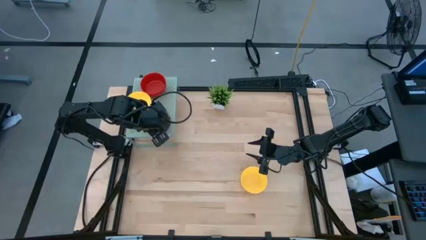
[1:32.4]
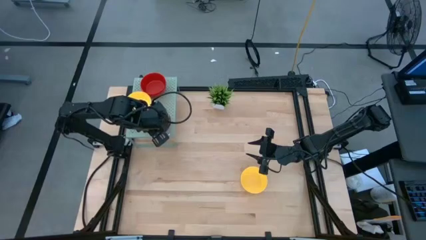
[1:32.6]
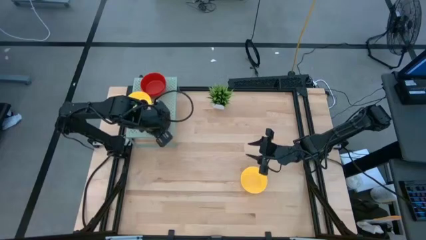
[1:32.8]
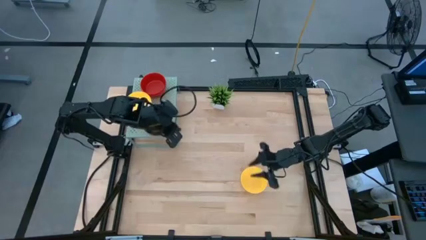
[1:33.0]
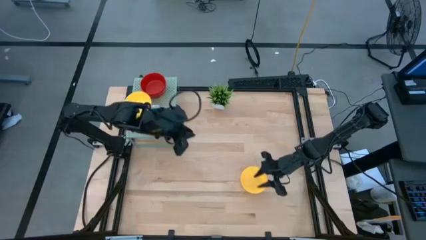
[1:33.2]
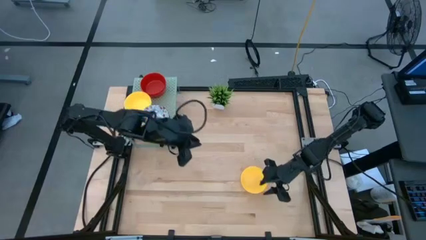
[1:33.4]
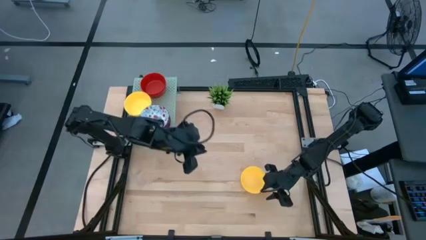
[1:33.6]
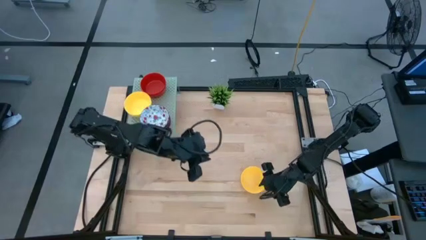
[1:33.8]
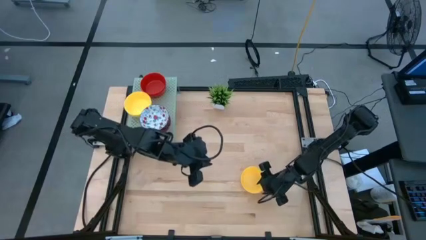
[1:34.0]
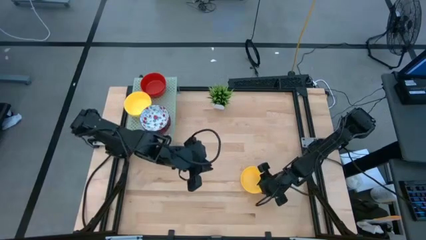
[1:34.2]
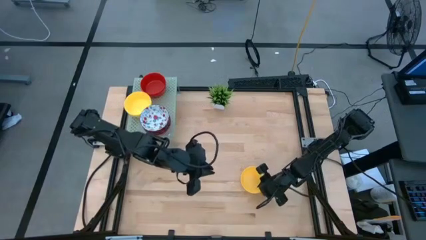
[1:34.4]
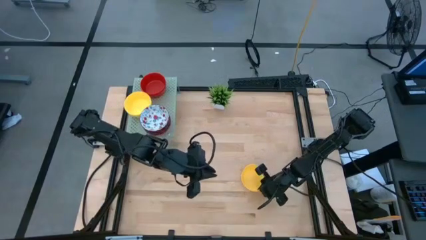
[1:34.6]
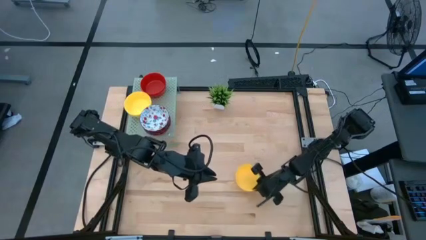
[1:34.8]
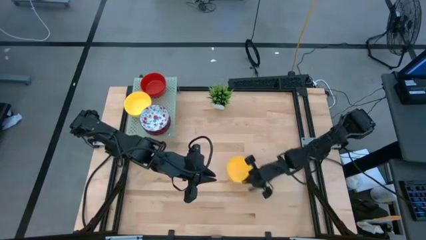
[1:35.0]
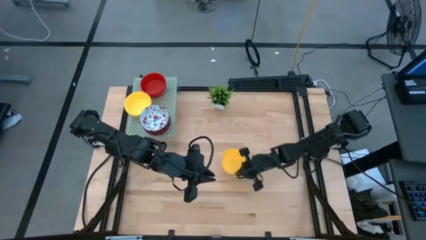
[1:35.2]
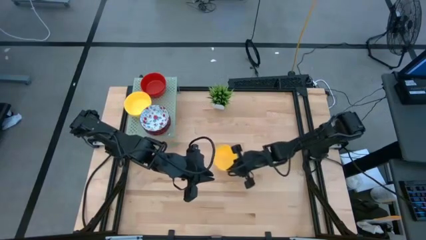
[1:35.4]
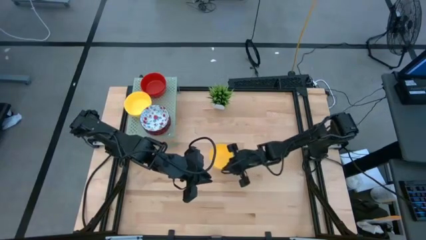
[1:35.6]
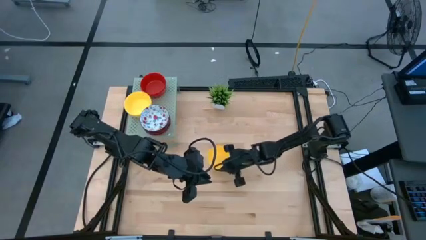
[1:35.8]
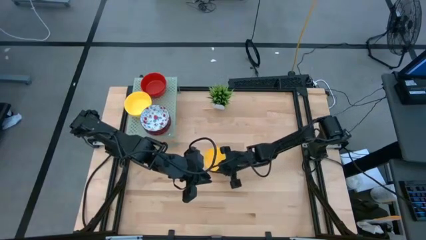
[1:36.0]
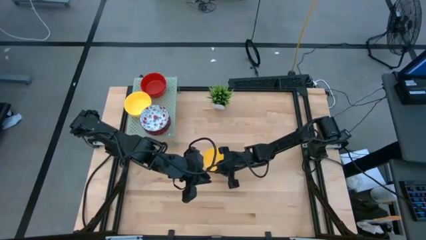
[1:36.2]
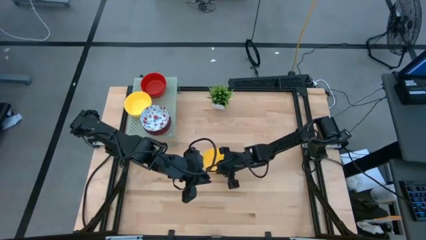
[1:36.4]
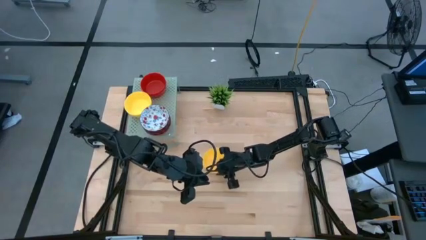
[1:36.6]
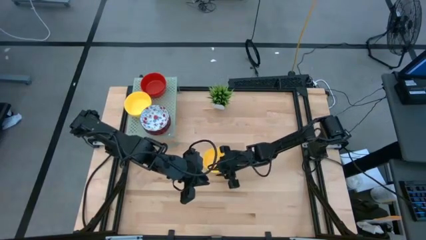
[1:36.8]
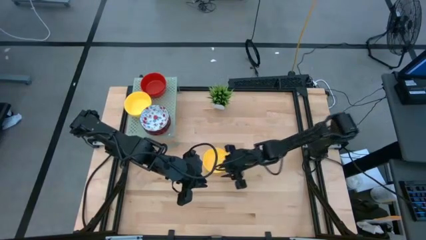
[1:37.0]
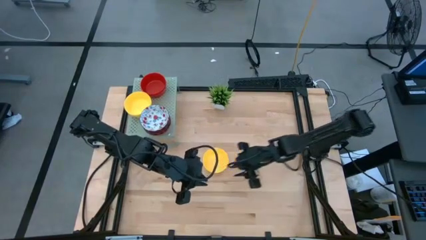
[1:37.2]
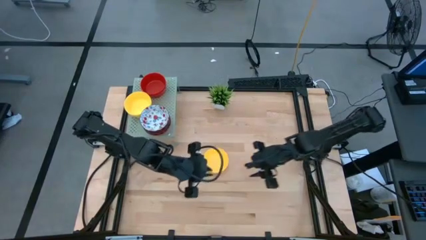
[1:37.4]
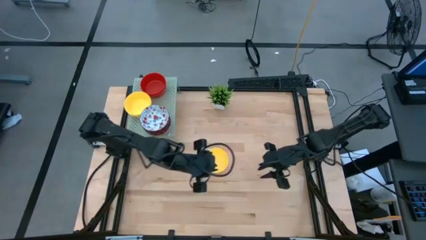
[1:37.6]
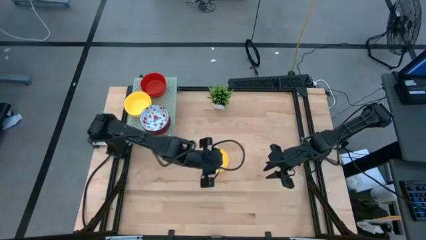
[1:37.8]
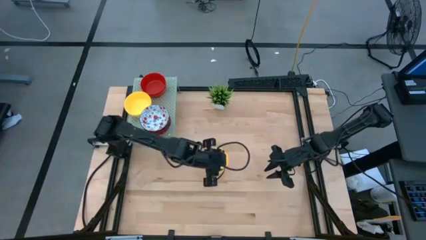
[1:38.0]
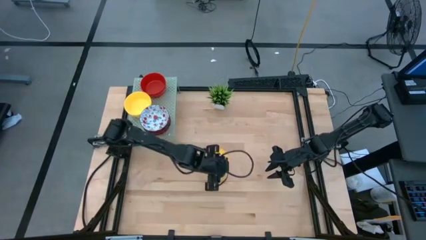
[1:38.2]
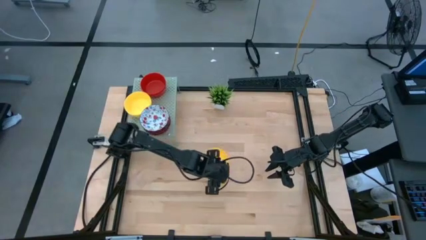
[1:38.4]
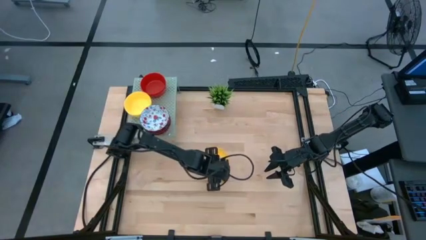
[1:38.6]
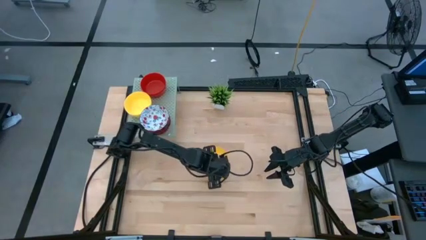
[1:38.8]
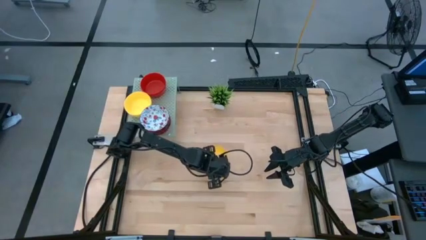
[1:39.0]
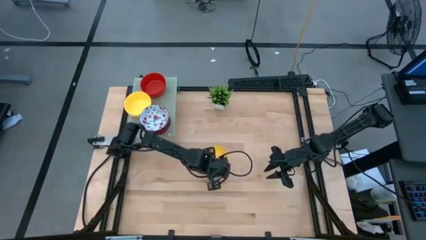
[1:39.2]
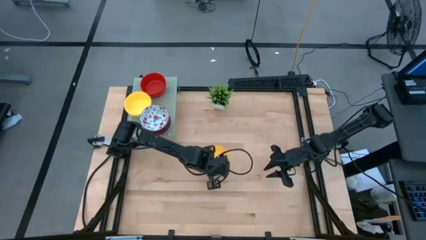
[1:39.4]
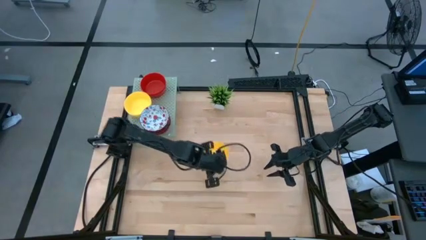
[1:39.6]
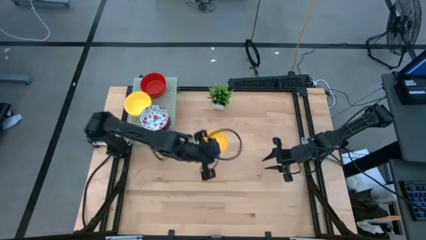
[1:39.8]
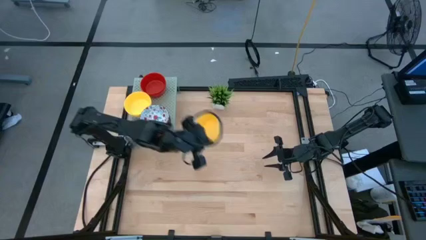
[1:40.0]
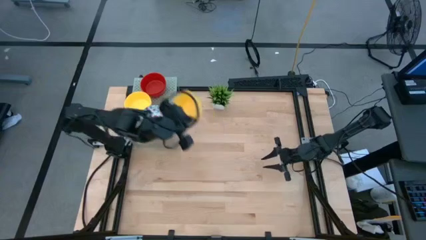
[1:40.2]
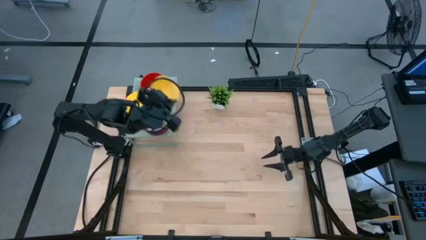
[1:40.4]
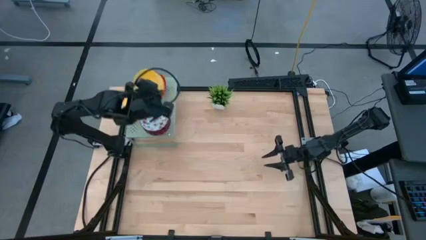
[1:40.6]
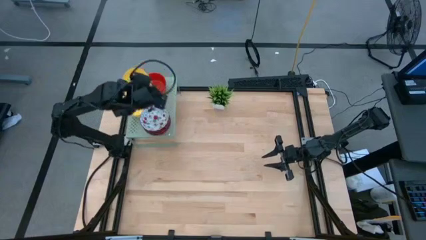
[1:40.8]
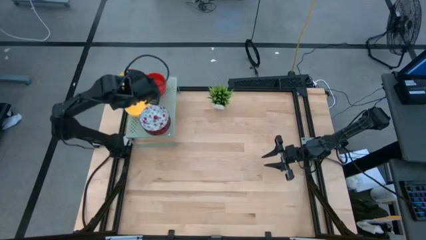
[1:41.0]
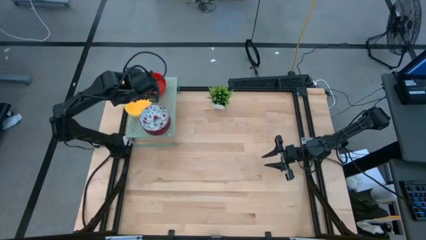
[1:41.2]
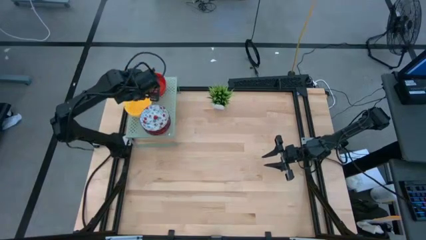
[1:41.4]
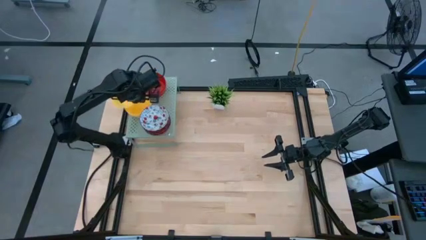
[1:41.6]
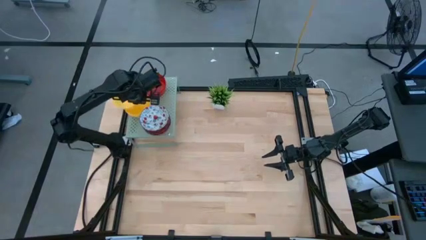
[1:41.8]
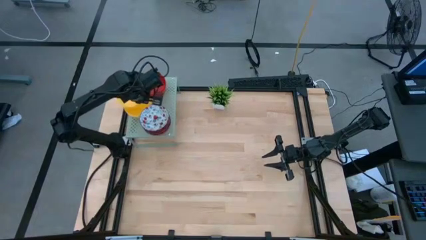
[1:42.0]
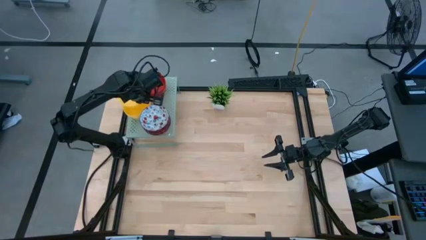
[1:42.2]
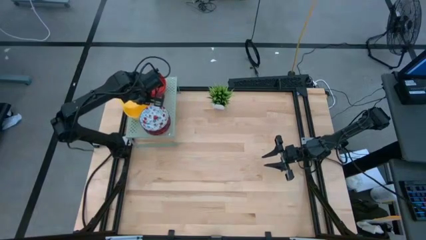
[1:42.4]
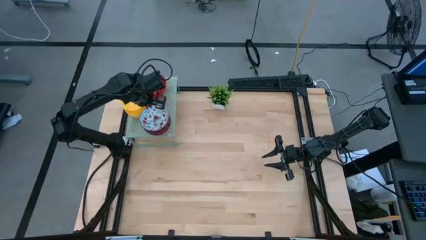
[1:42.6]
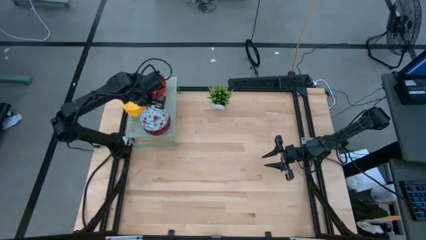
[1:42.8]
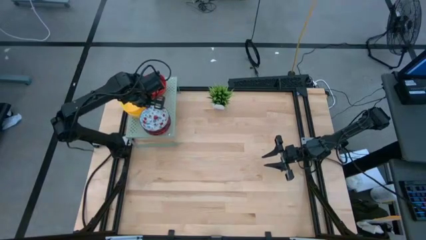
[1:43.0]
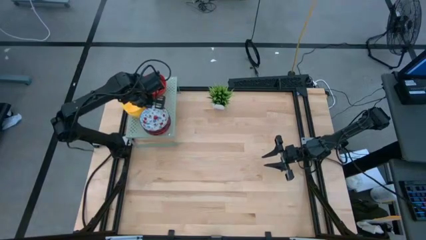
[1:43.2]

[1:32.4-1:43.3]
Task: Pick & Place Mini bowls
Stack the yellow bowl on the yellow bowls on the shelf

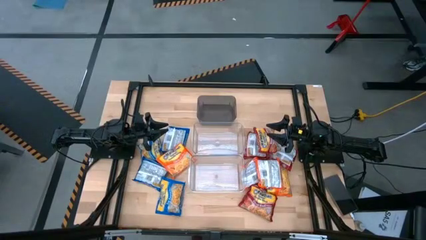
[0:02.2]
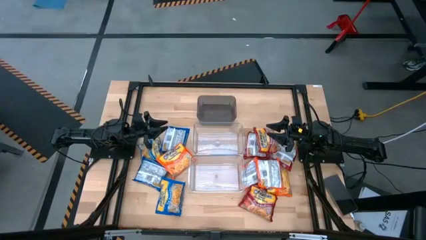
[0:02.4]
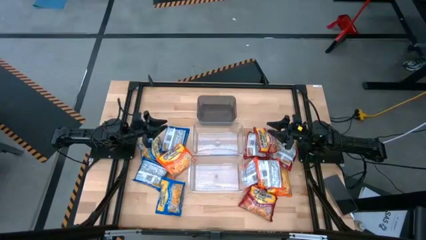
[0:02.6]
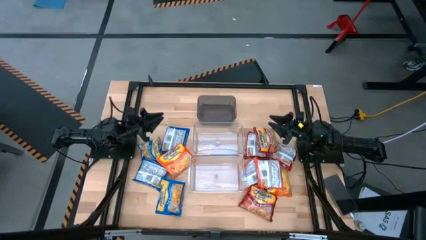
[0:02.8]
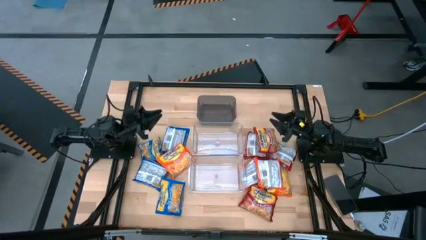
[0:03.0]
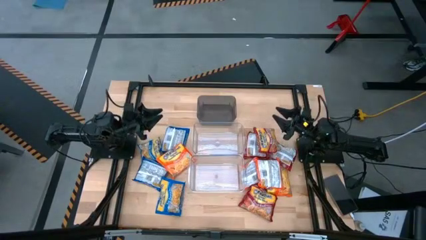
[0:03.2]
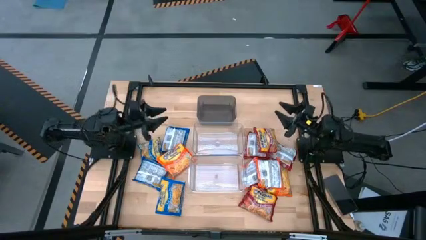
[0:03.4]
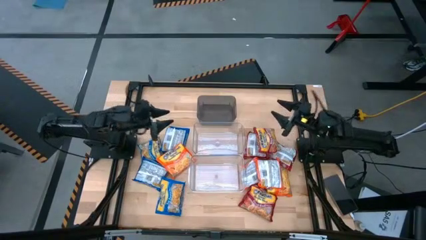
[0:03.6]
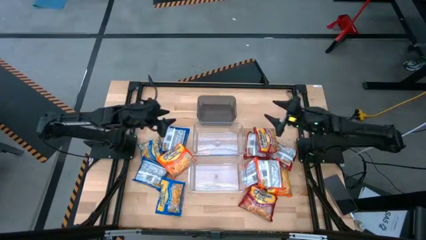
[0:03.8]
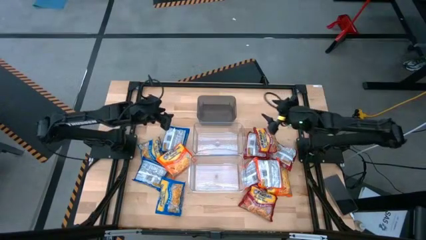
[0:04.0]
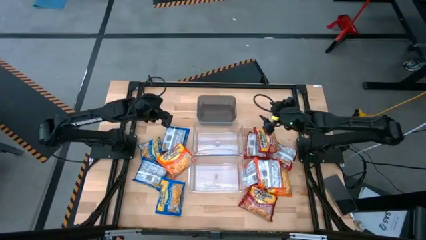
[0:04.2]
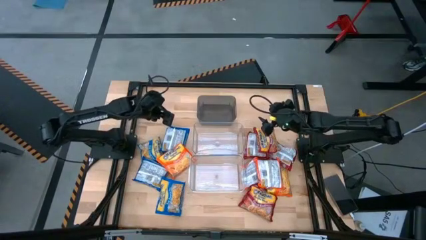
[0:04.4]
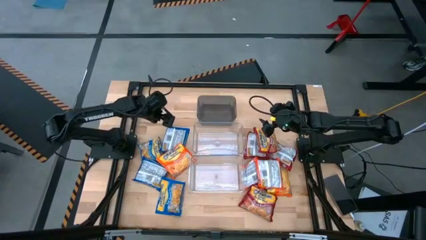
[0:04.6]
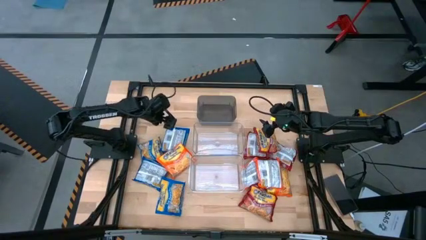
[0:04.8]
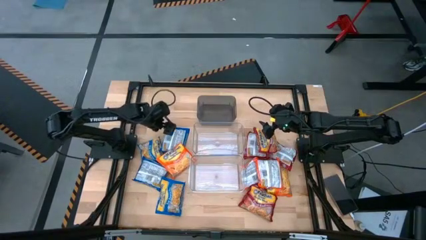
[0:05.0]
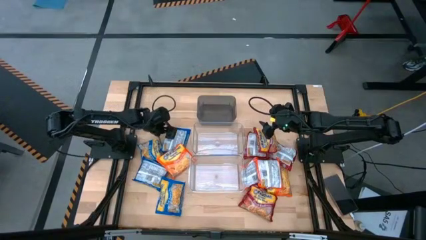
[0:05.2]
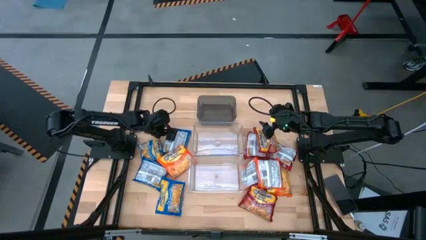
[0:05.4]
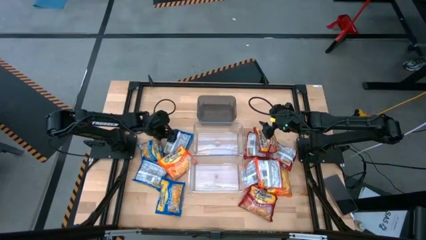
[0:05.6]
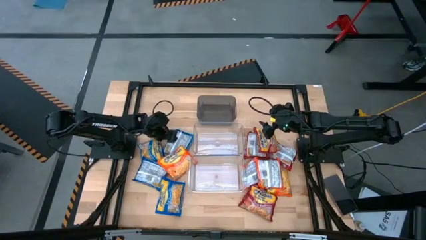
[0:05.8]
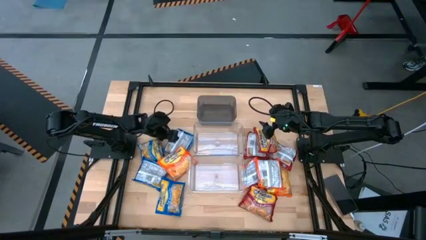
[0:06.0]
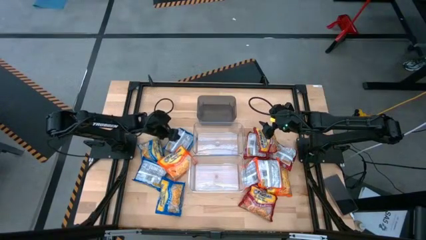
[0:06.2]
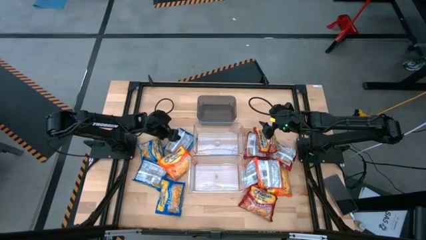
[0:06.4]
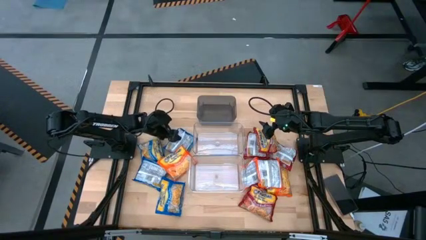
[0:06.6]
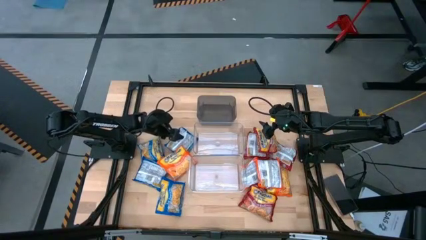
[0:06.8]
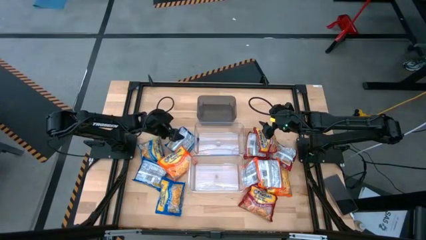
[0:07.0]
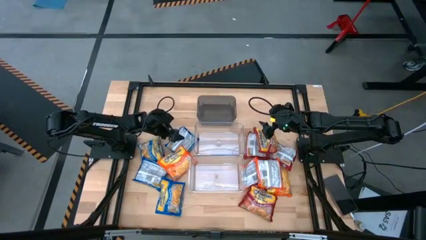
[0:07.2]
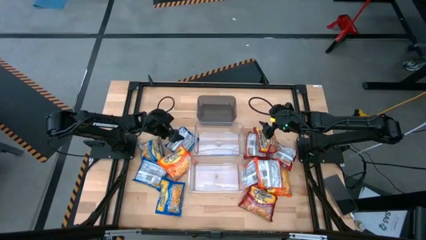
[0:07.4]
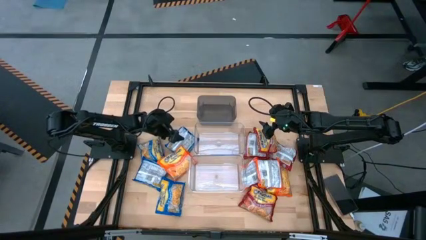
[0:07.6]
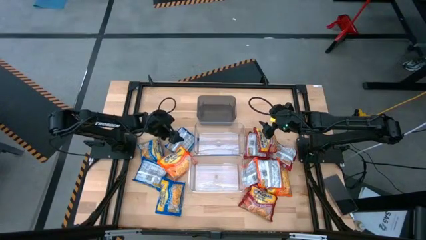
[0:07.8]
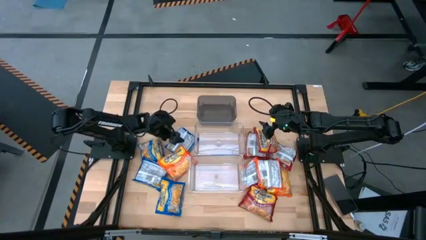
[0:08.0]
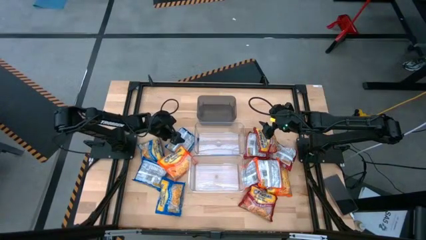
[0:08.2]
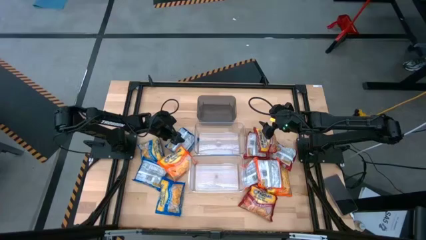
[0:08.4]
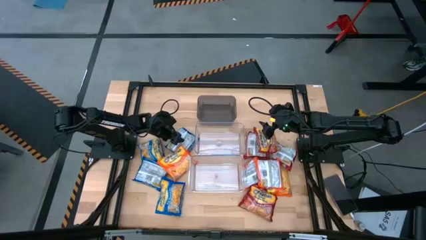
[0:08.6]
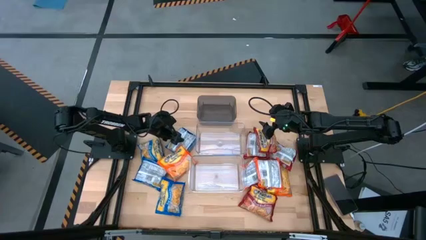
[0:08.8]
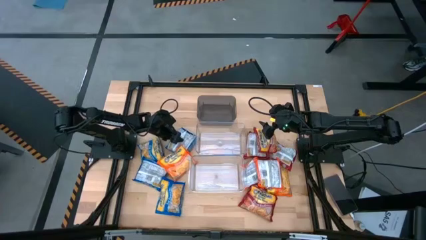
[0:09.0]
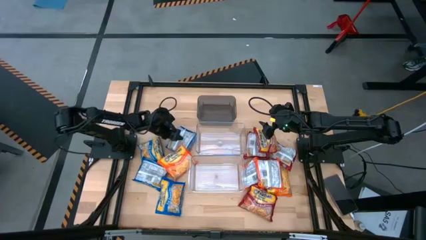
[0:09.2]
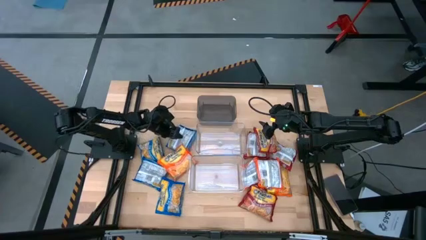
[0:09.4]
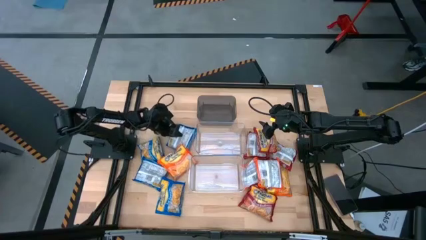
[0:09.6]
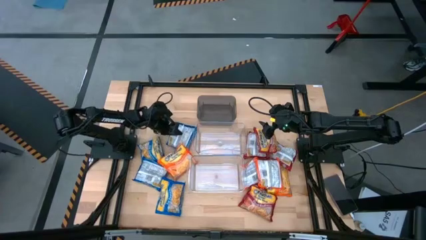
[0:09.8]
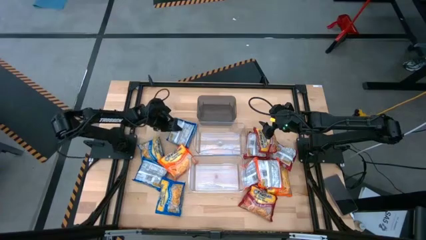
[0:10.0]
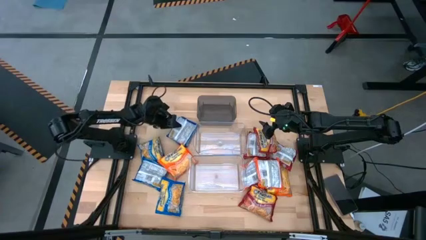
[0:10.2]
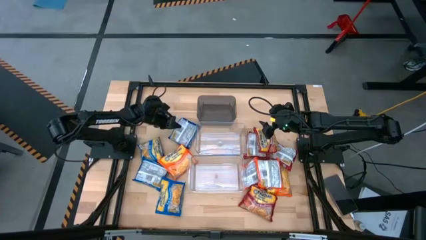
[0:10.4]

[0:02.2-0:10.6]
Task: Sort Maruchan noodles
Put the blue noodle pack into the black bin
